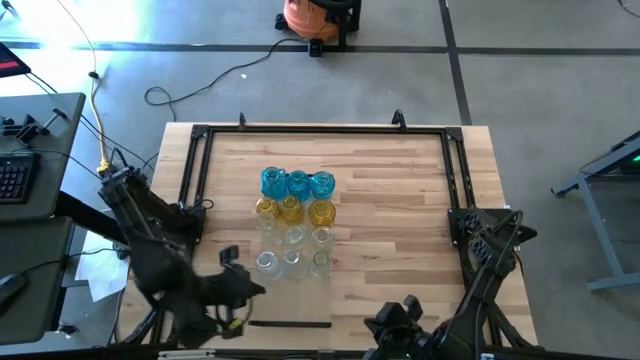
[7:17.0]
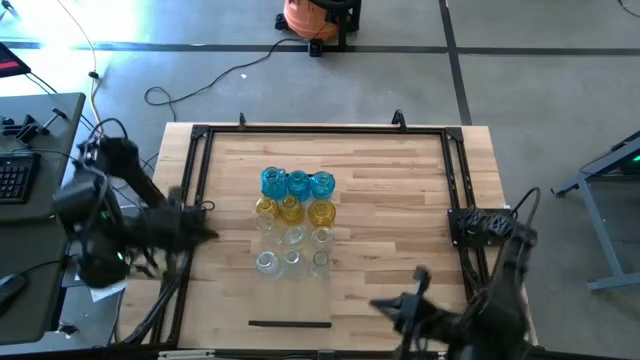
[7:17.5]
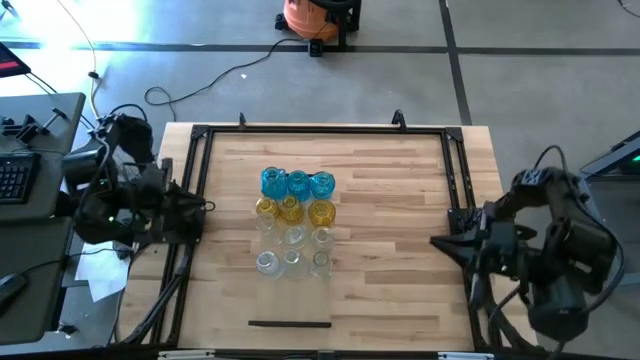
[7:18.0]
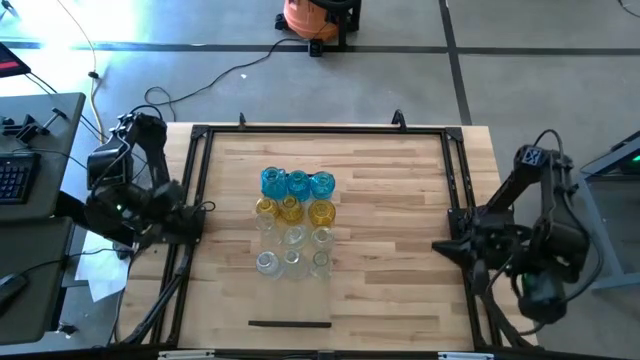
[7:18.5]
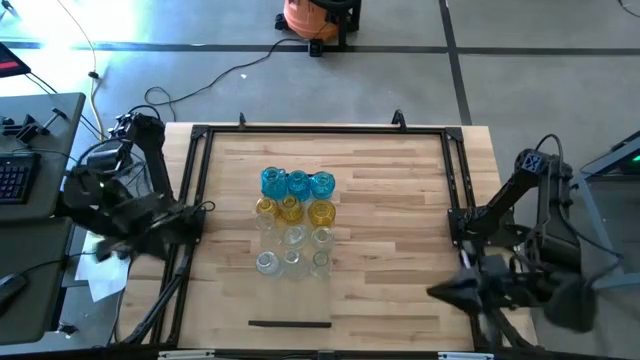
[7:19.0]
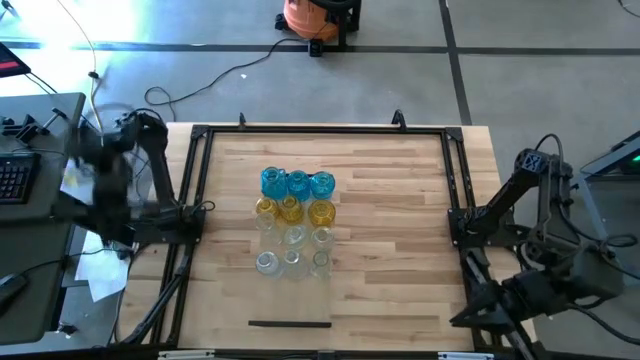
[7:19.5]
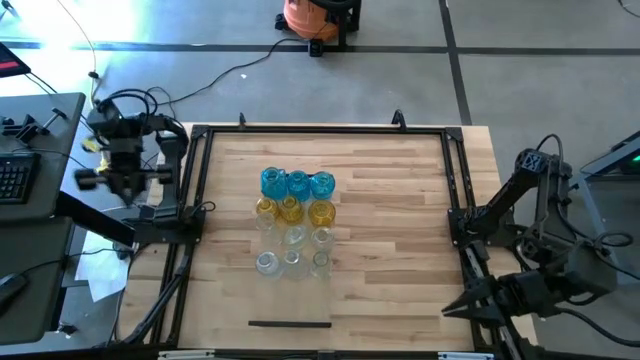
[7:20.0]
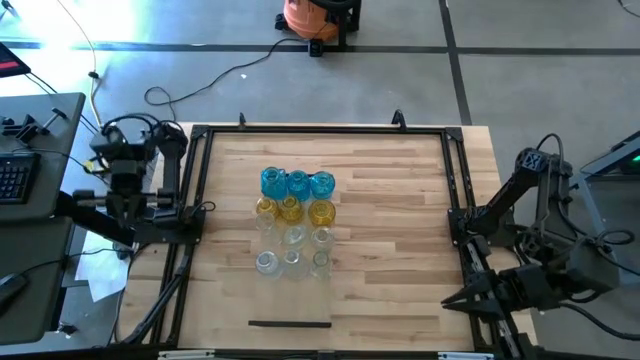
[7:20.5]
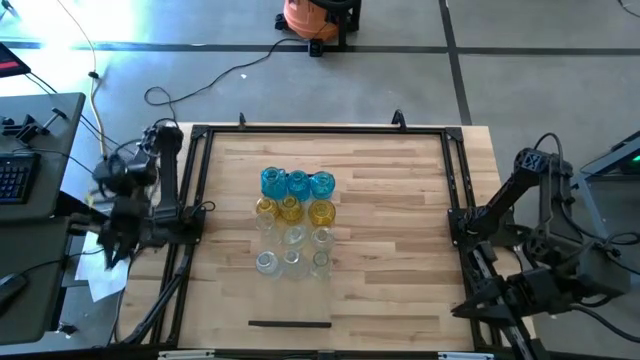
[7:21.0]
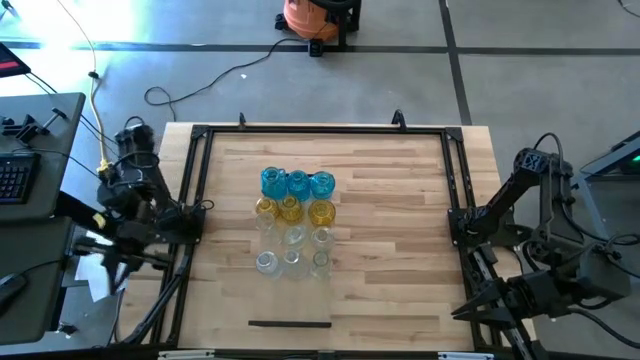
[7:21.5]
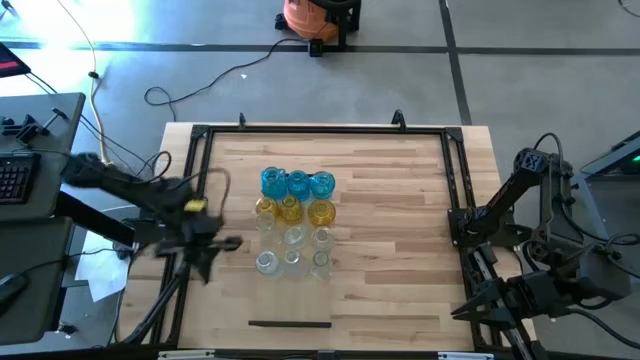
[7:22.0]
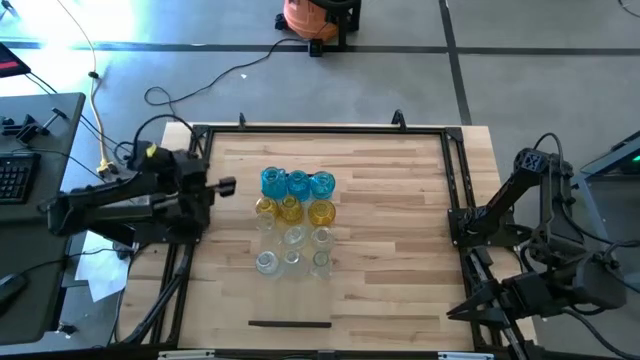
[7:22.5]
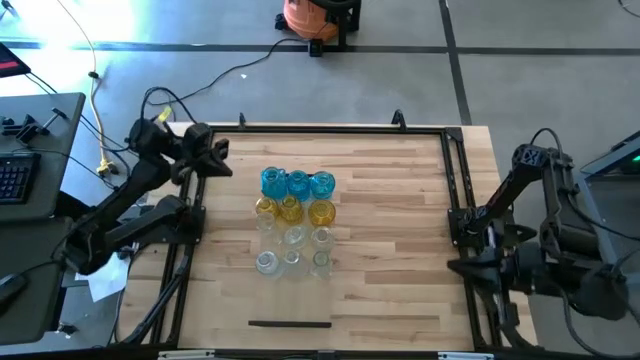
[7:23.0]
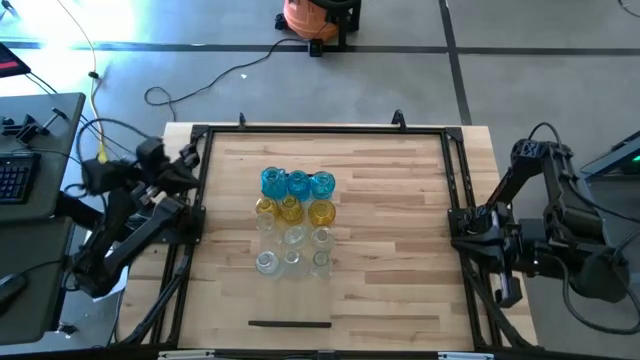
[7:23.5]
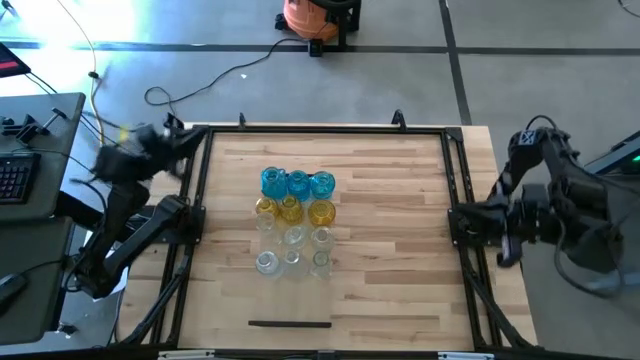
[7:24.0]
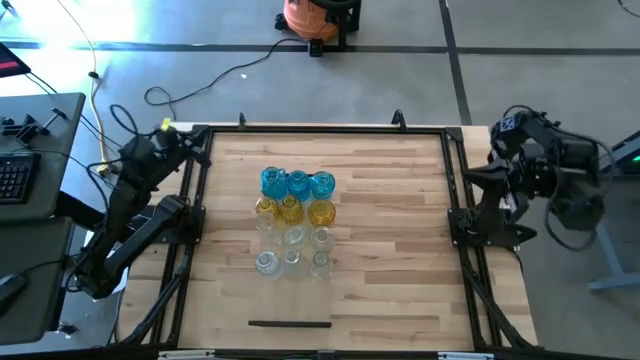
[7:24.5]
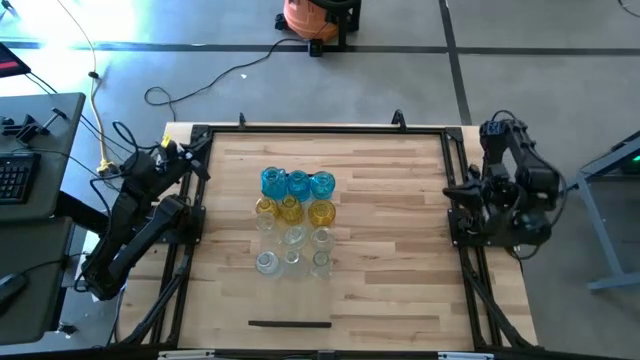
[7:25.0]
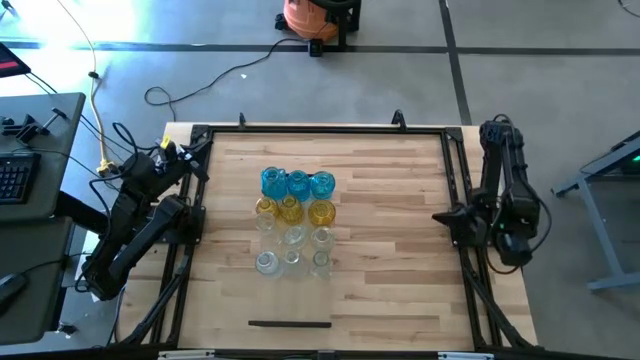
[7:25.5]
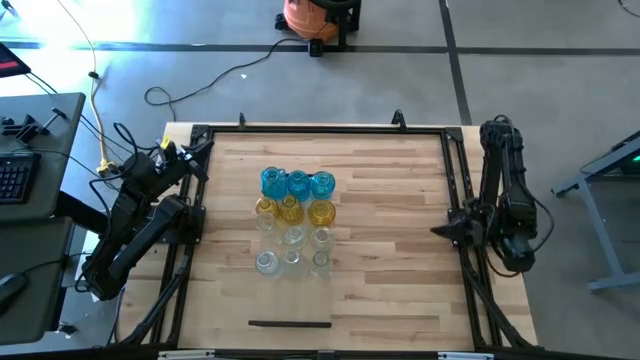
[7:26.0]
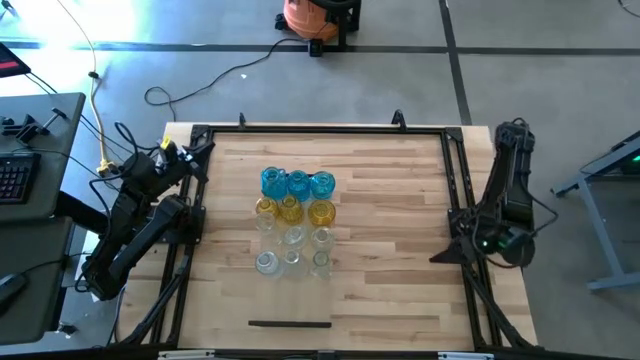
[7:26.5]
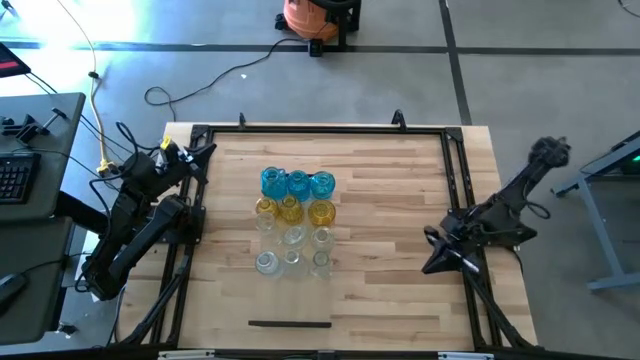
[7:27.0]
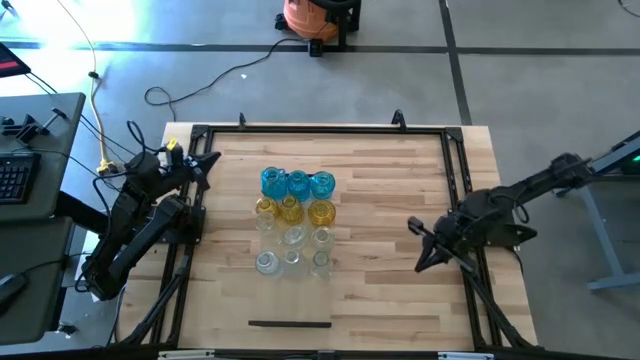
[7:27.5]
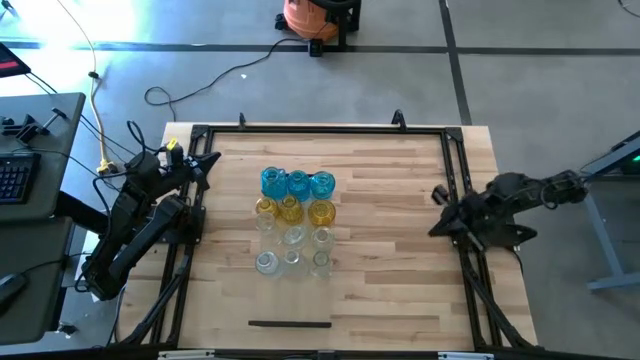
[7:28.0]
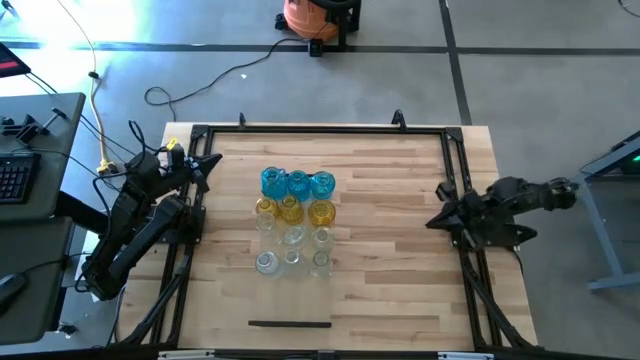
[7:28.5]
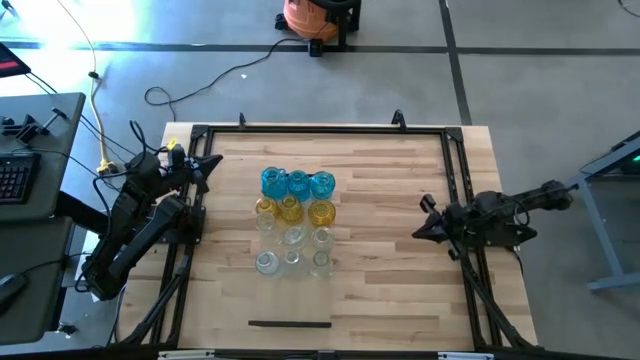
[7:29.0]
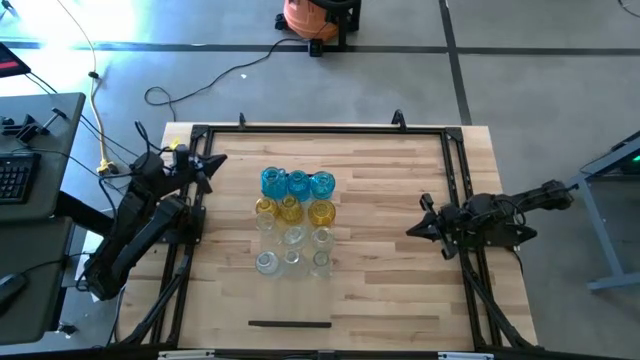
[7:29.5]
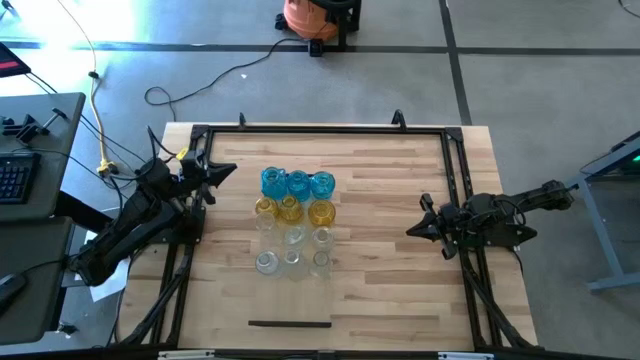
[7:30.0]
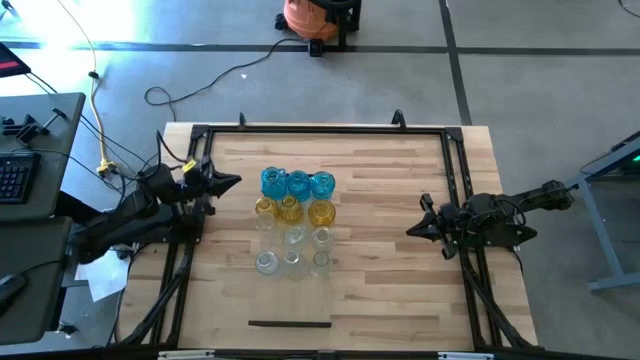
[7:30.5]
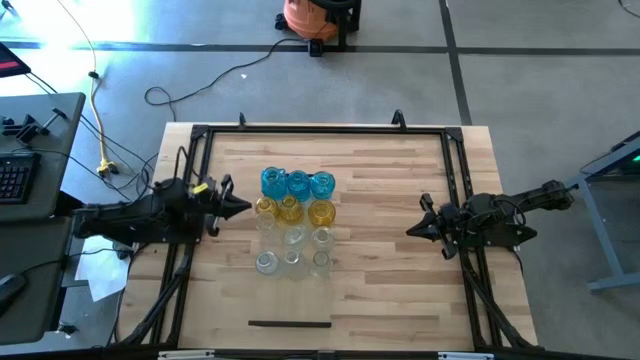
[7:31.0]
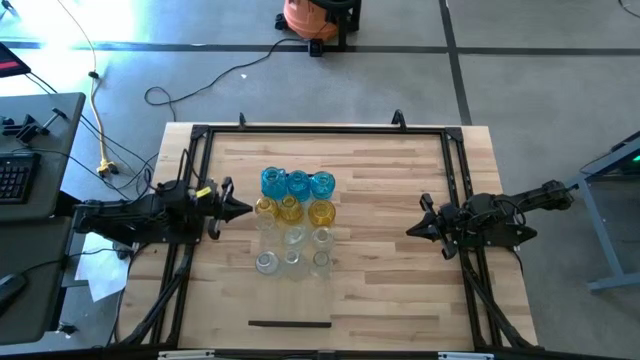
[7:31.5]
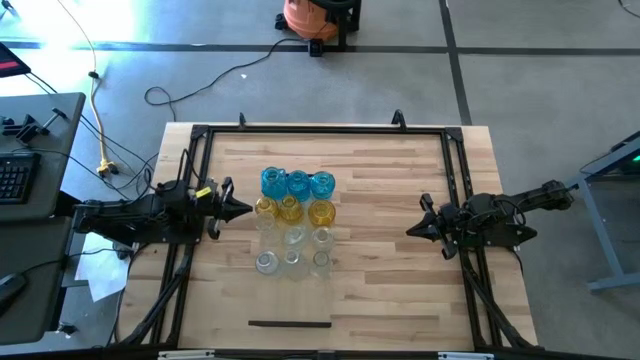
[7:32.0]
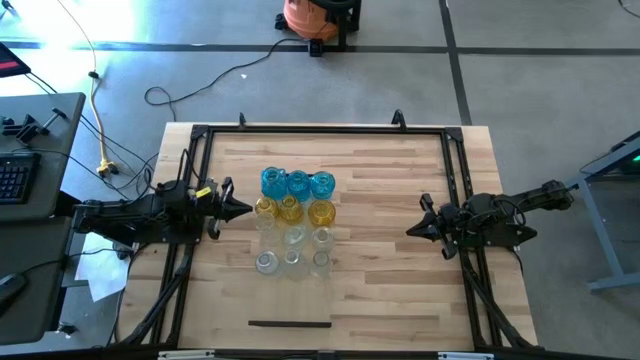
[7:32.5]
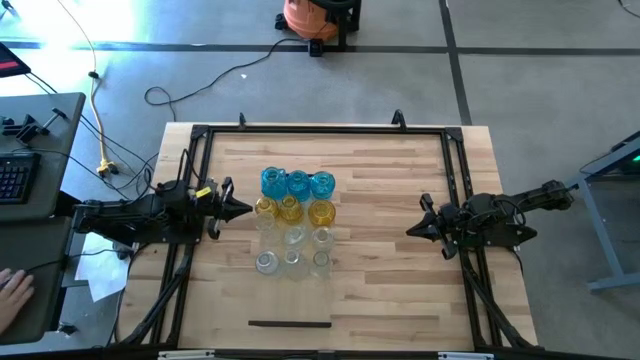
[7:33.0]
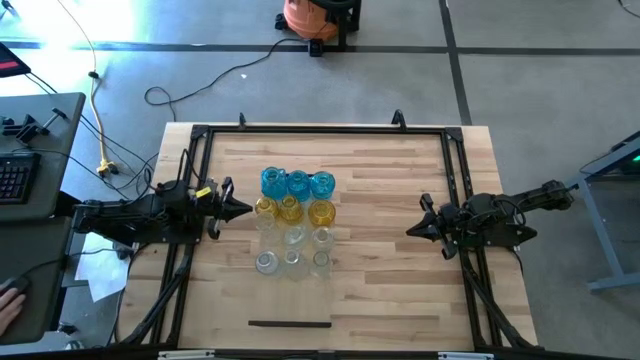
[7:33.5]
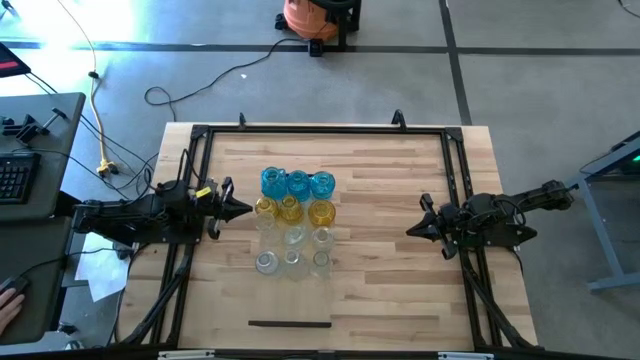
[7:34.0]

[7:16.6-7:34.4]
Task: sort vases onto shelf
Return to Home Position

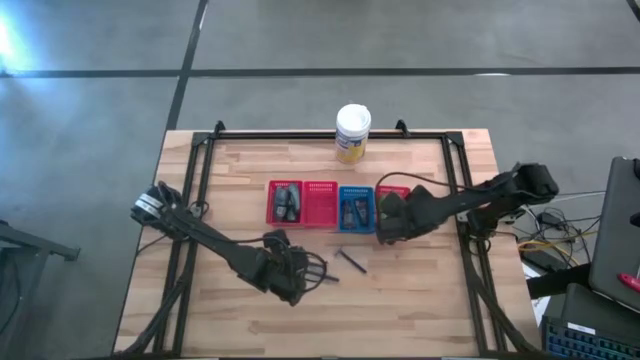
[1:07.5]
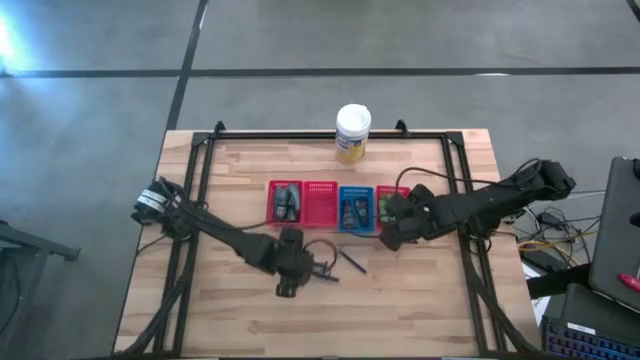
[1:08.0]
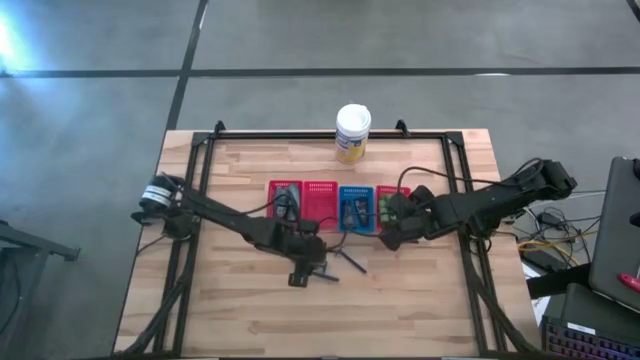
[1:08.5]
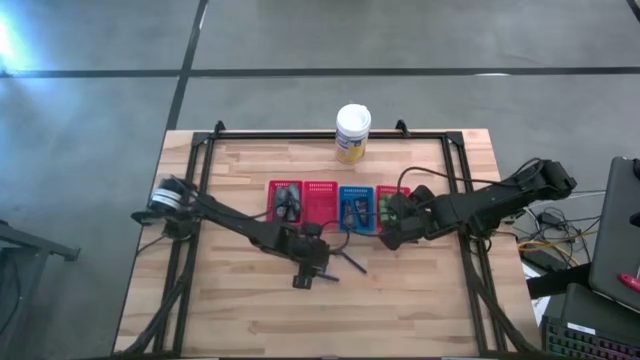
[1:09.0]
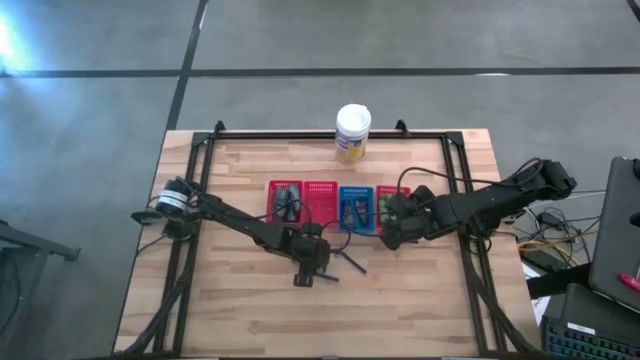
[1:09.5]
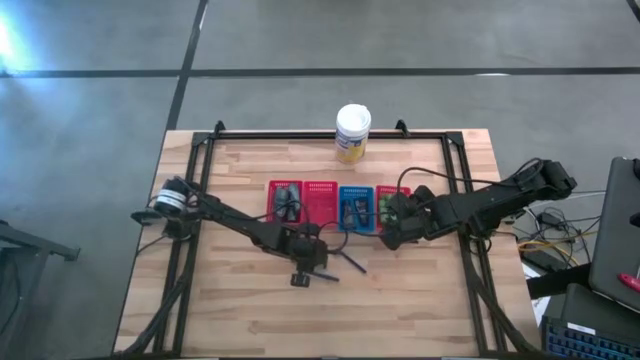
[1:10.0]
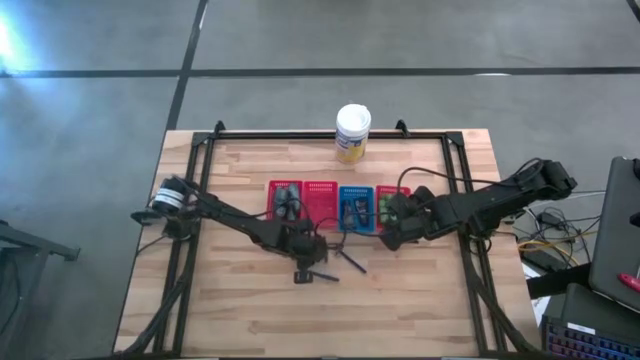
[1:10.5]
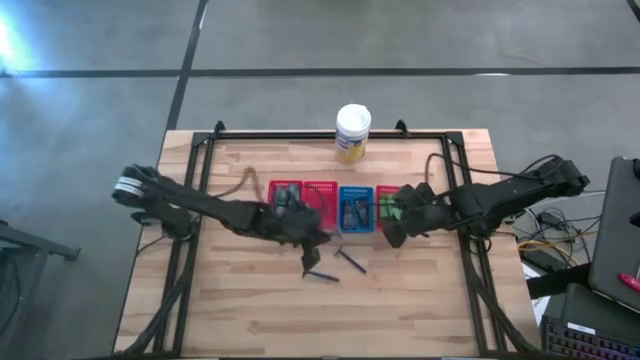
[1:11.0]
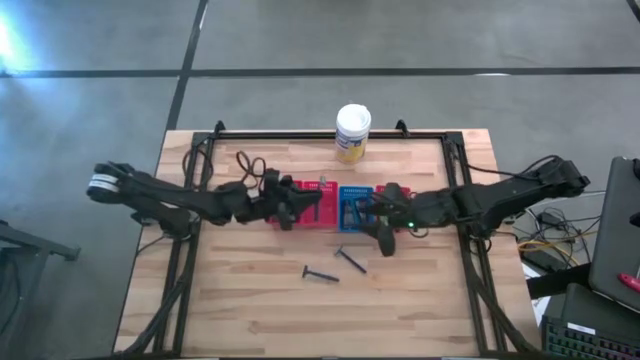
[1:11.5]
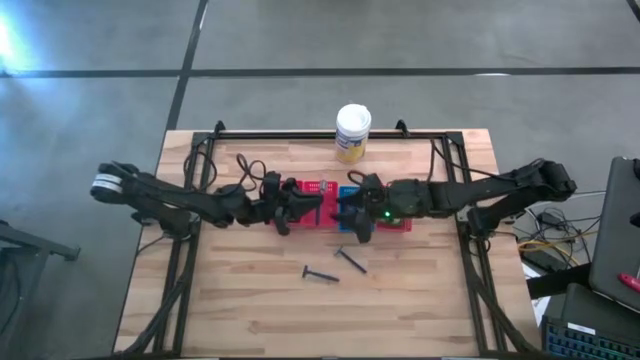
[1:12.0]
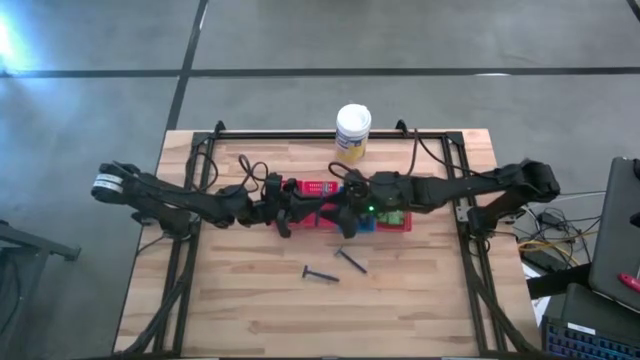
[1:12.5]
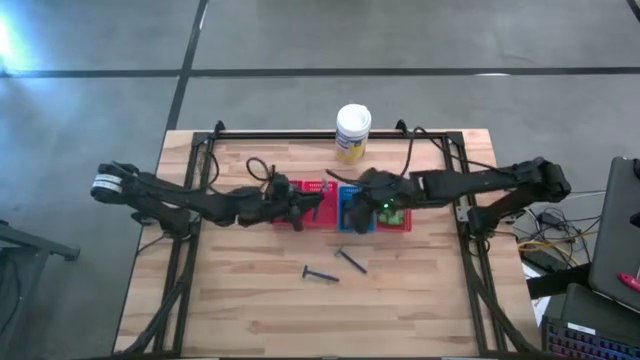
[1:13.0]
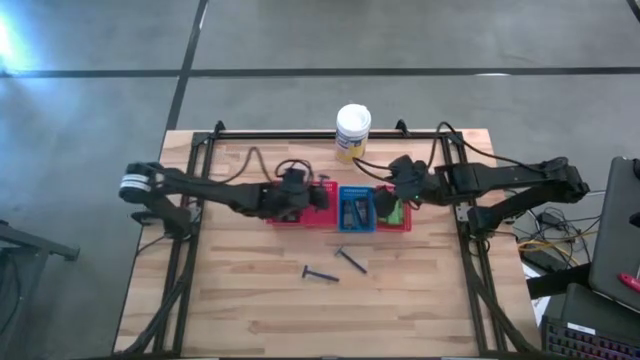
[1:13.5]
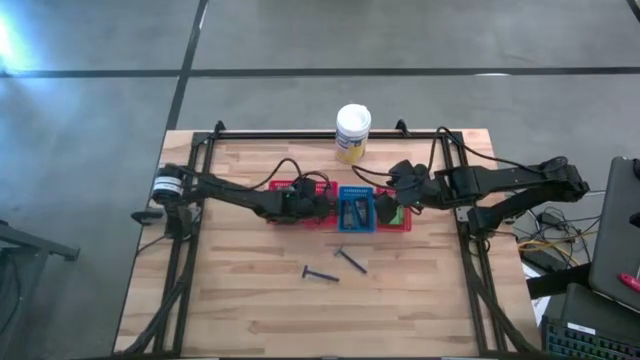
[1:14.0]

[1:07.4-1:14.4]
Task: Pick & Place Travel size toiletries
Put the blue razor into the middle left red bin
